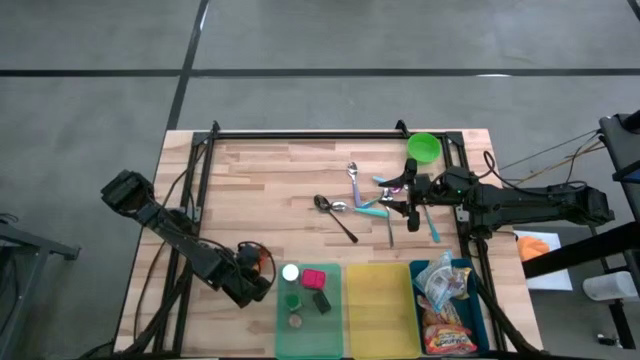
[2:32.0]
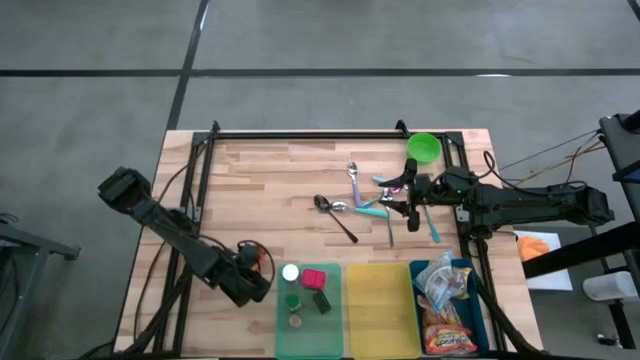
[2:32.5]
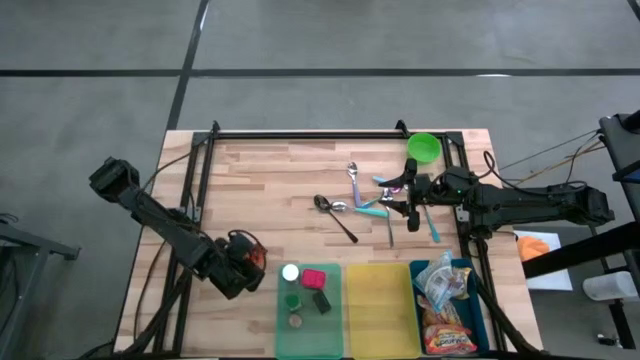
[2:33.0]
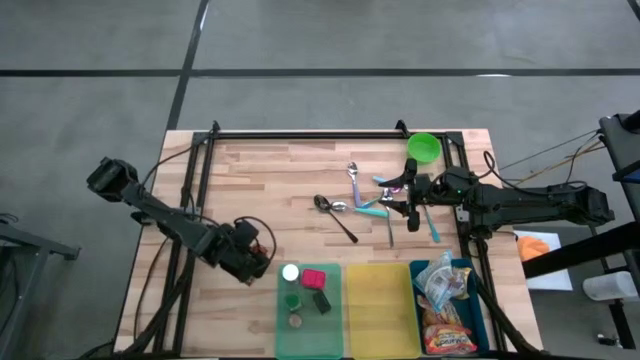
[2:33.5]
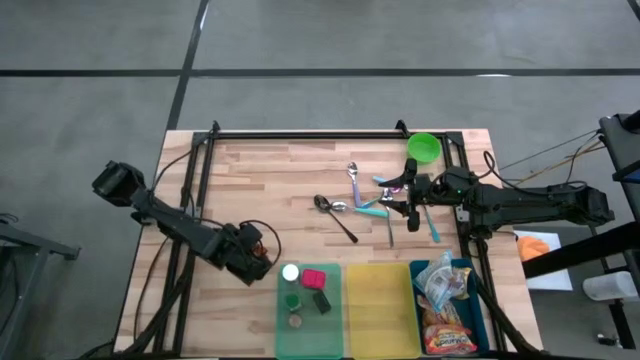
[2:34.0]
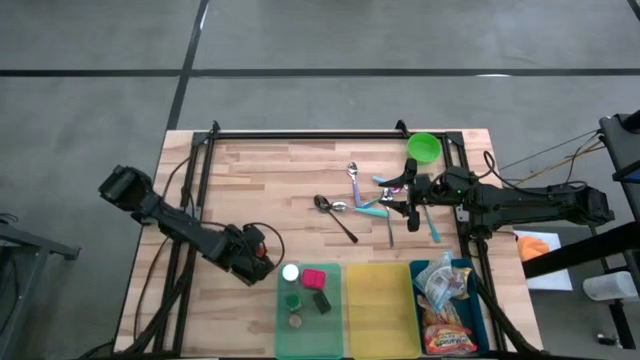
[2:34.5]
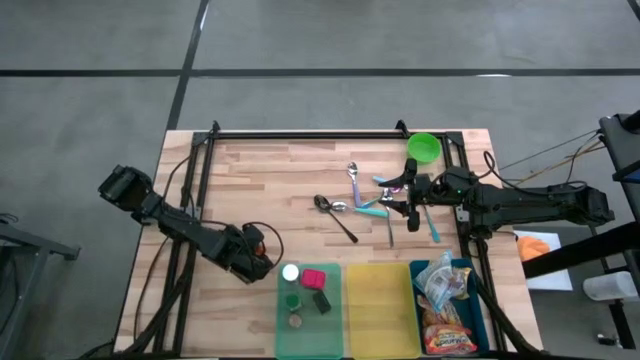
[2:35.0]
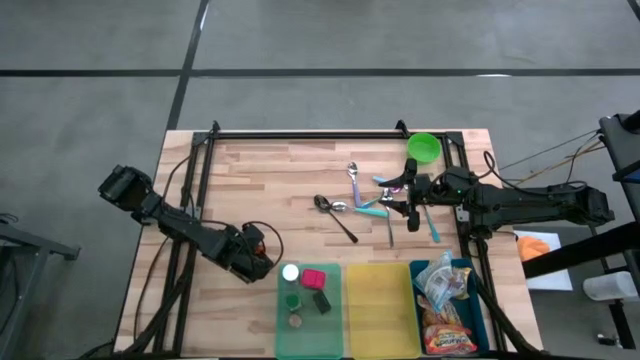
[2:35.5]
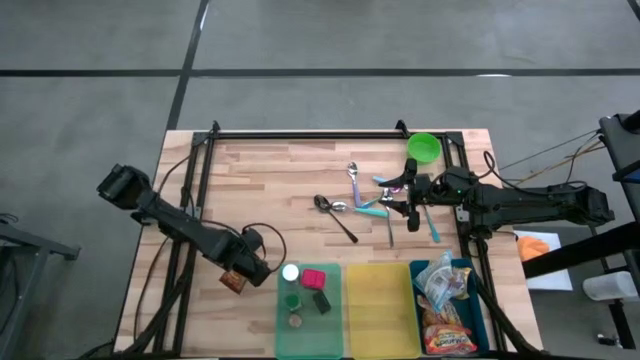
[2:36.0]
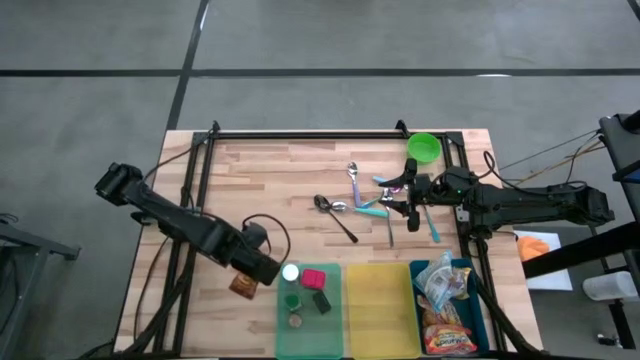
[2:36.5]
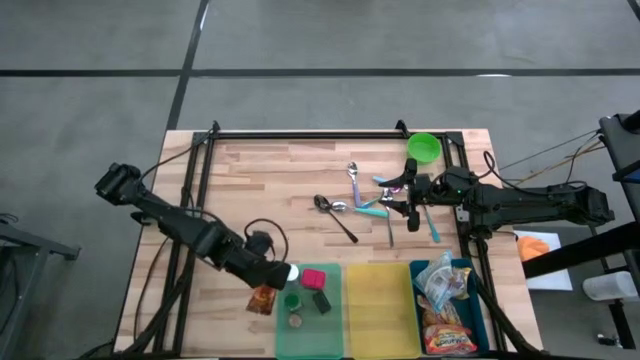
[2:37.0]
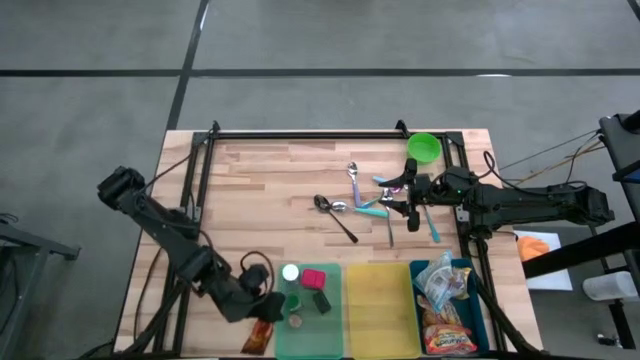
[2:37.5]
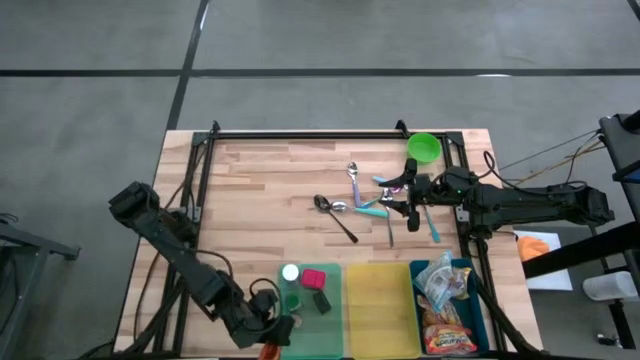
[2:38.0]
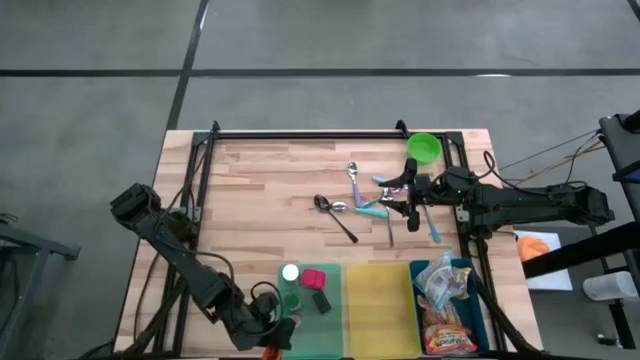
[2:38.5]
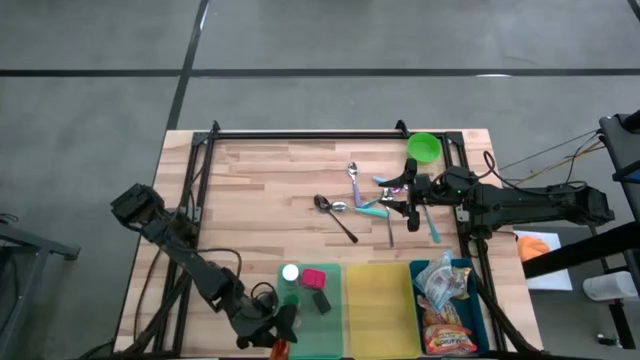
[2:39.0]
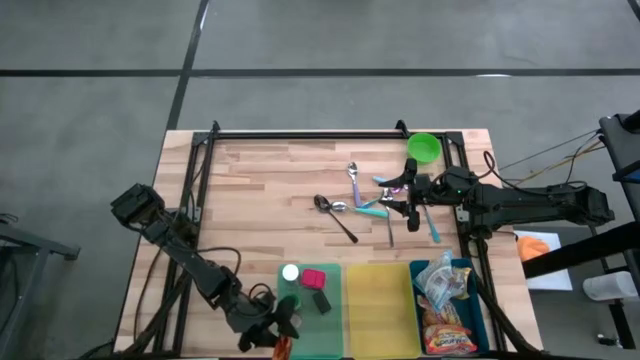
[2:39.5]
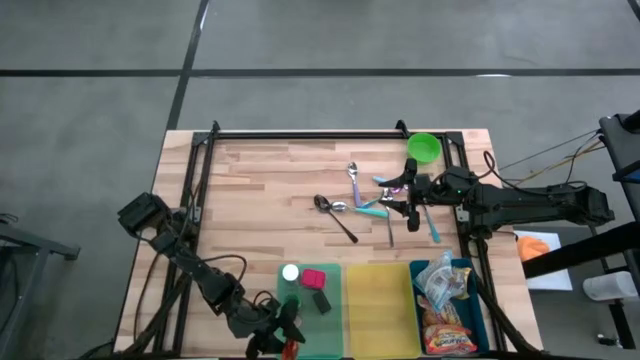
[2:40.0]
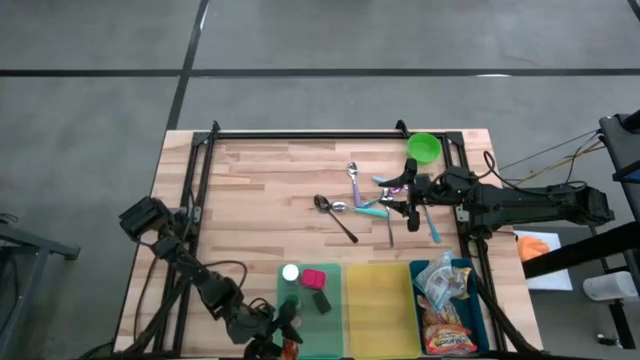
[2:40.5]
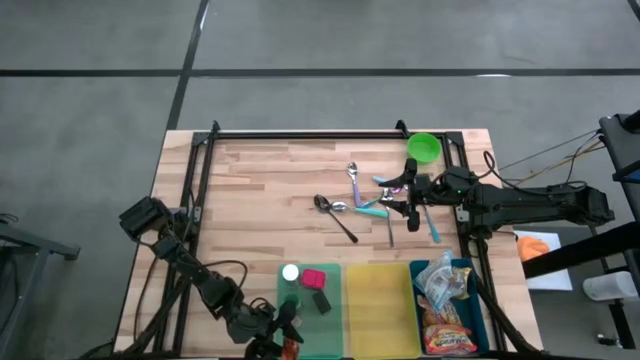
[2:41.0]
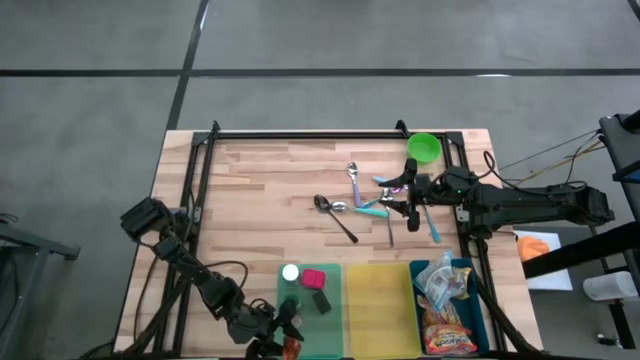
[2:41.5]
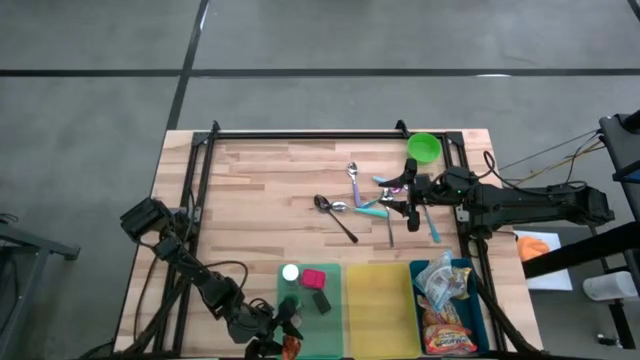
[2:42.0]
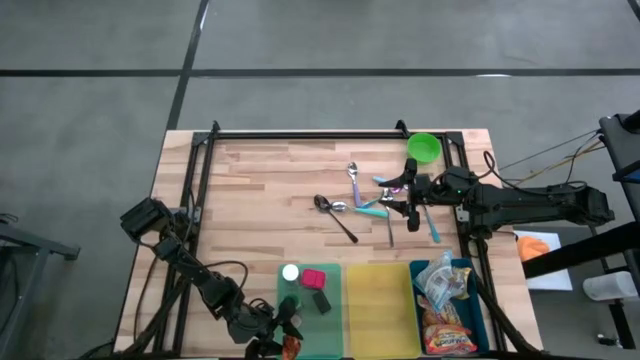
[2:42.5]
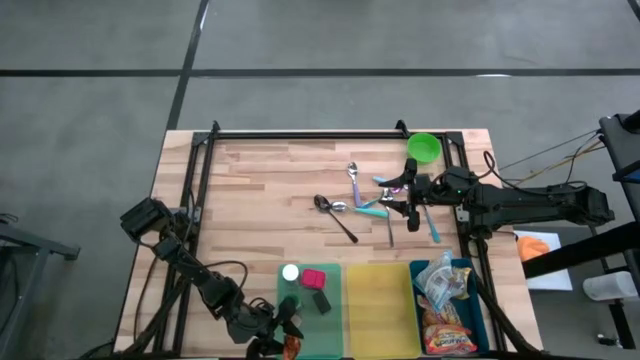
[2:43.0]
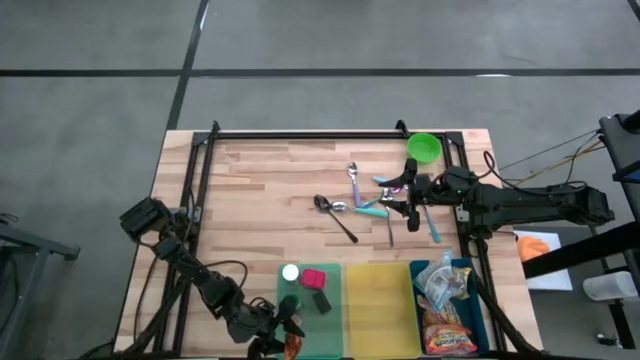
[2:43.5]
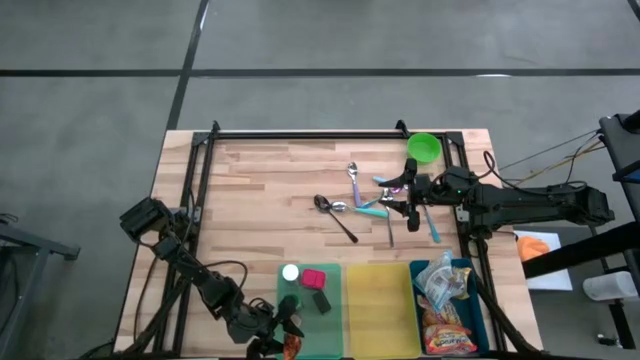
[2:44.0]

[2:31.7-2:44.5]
Put the orange seasoning pack into the green bin
